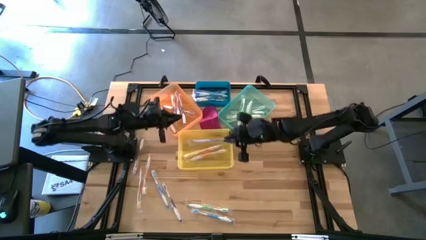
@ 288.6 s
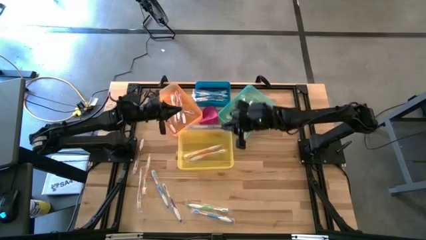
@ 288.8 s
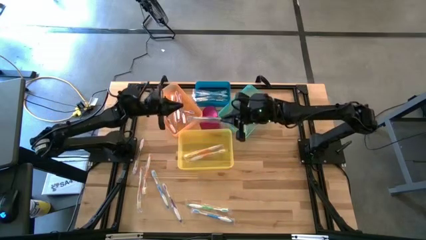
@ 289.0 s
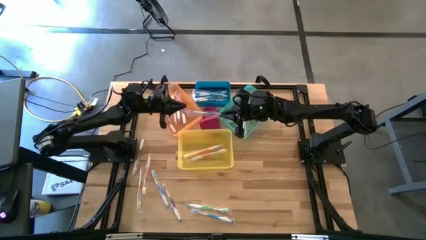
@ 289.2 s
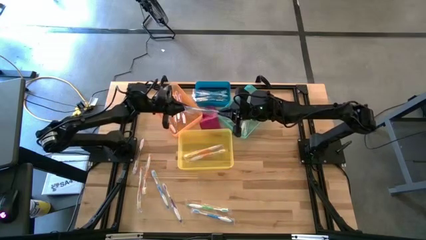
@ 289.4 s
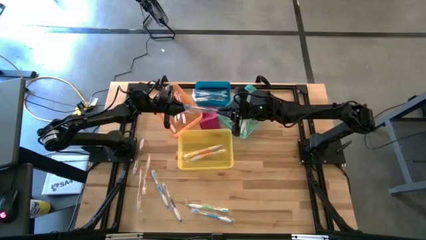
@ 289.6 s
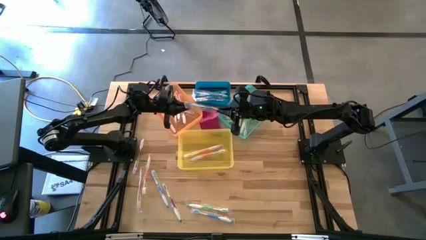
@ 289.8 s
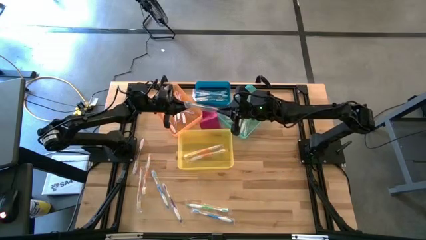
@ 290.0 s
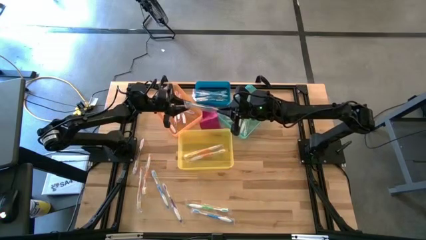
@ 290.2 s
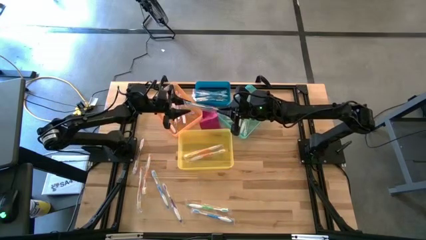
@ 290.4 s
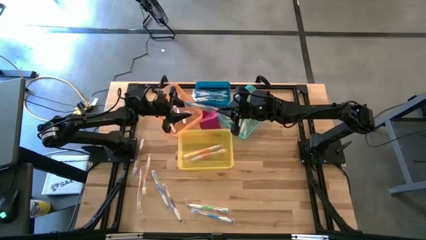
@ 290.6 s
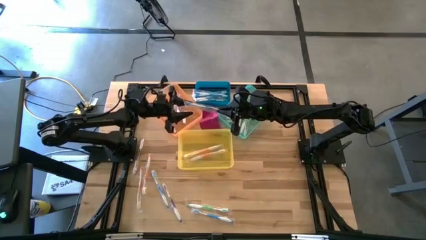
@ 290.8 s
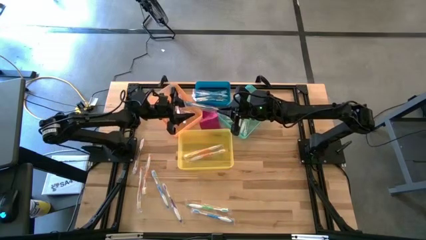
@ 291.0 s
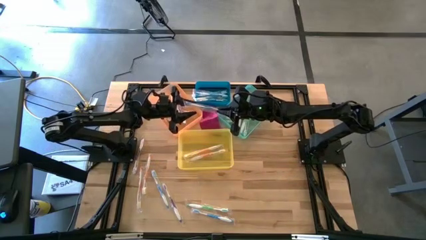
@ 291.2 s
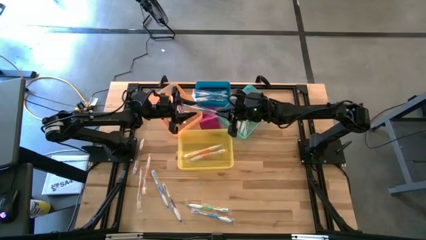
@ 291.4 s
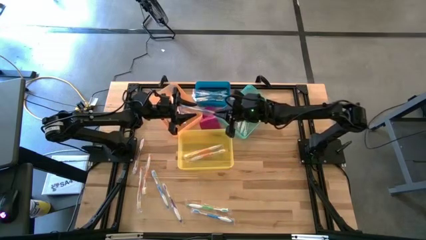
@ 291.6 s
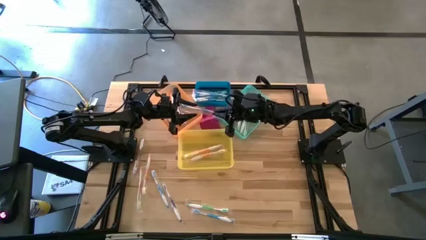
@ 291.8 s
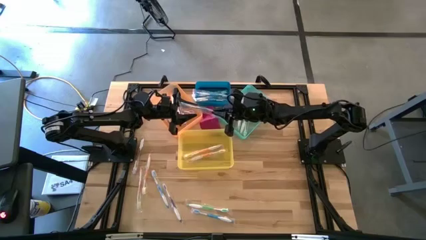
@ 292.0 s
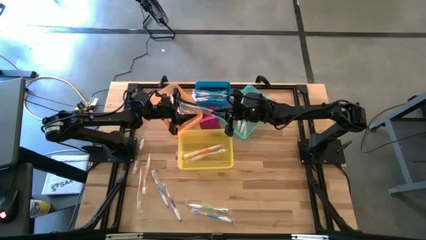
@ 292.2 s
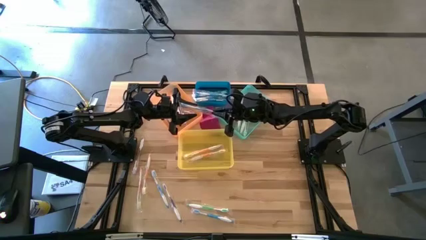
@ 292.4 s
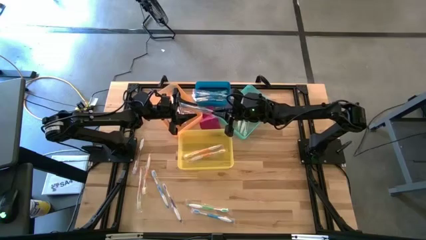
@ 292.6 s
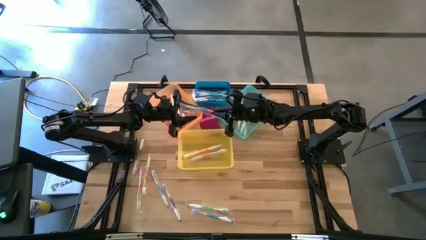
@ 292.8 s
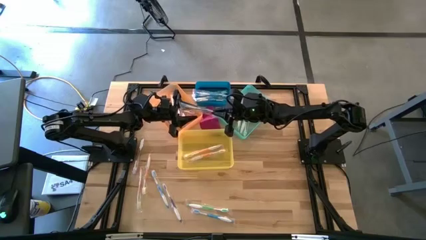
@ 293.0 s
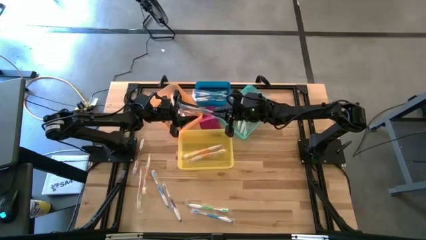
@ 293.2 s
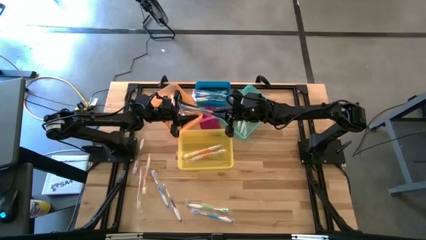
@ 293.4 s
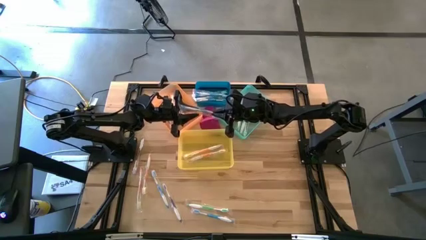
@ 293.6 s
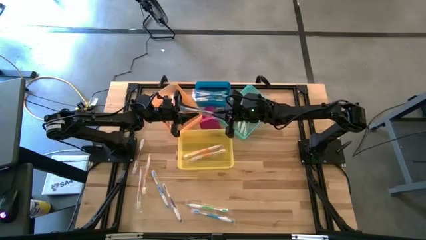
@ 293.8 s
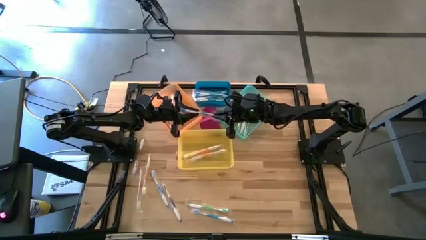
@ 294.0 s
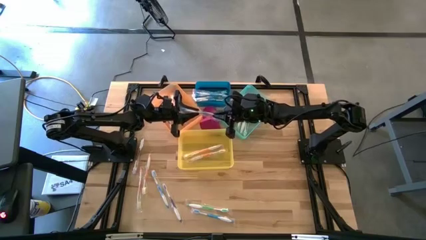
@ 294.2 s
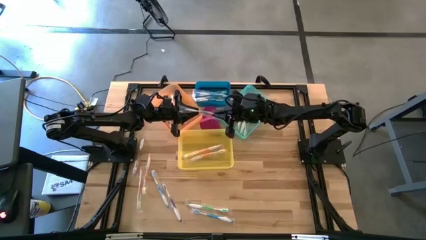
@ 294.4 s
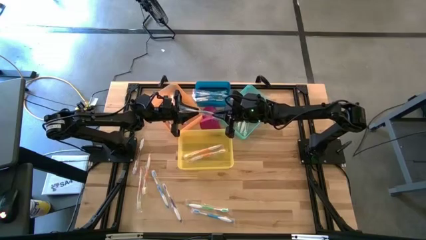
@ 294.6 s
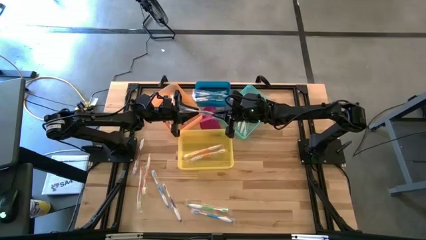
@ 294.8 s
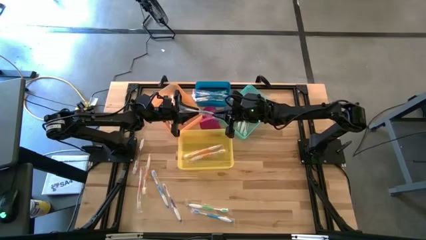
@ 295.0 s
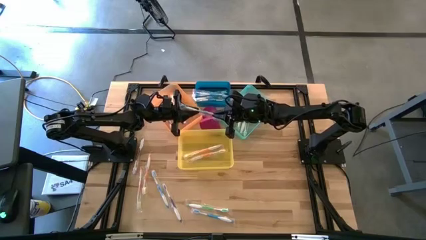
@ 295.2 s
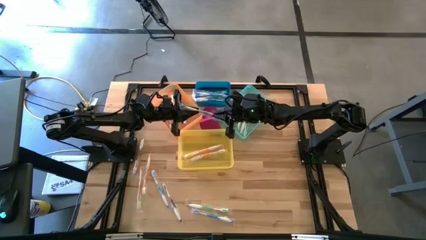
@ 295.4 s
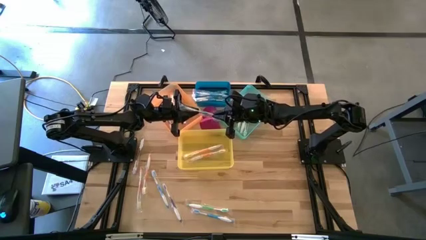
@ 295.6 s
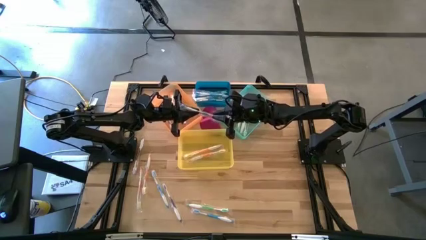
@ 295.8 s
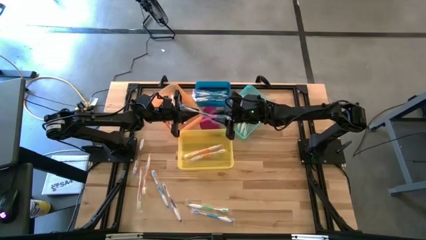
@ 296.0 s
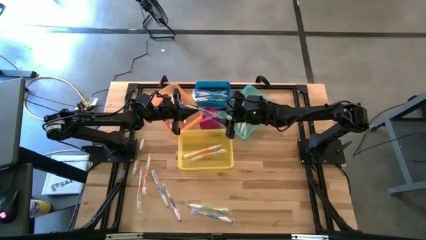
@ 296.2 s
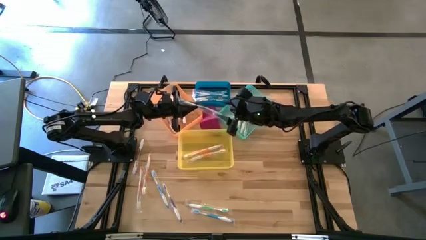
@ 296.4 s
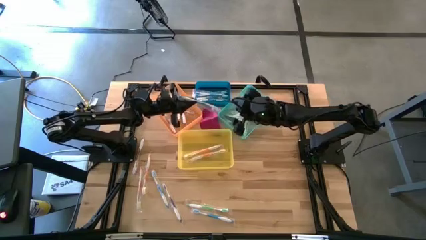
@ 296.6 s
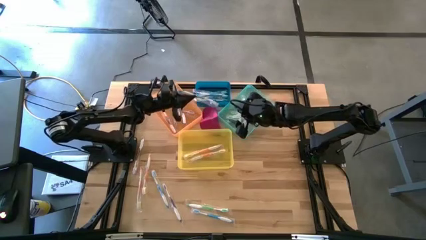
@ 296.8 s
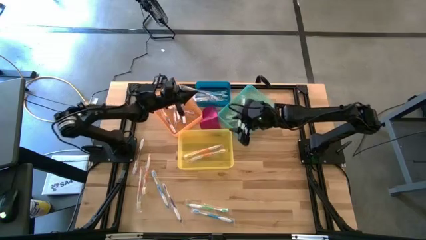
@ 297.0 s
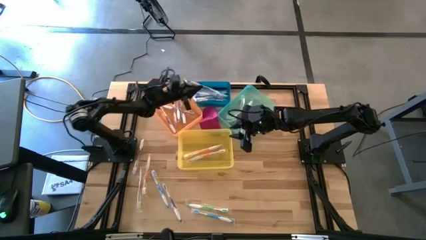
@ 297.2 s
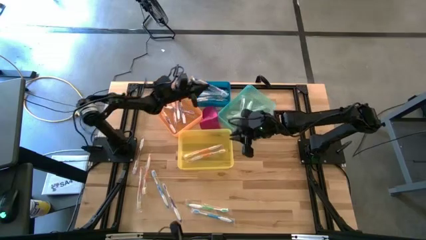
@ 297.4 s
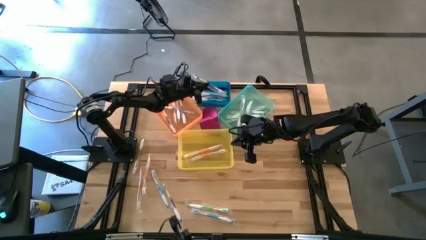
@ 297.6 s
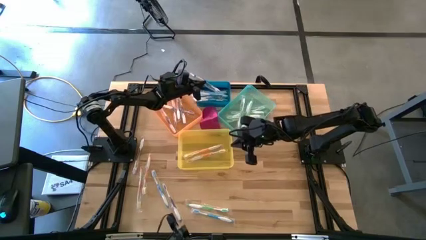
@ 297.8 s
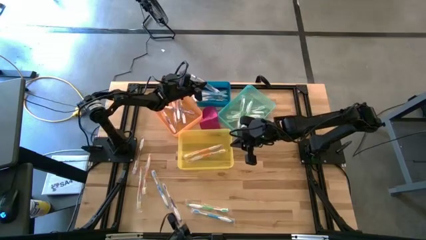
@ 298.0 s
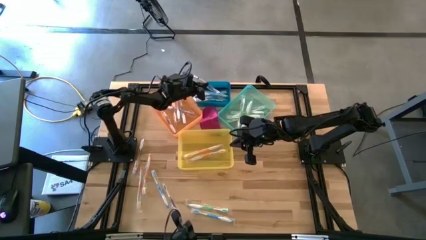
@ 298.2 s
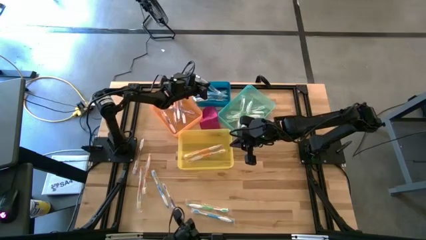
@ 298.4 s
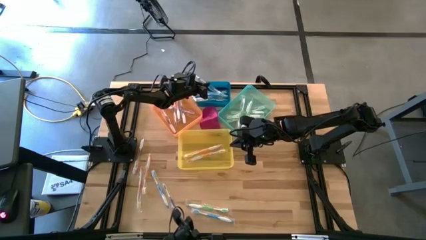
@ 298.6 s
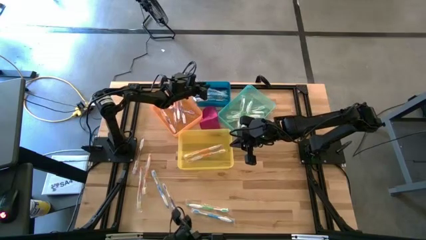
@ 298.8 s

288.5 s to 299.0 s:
Task: Pick & Place Toothbrushes
Put the blue toothbrush into the blue bin
